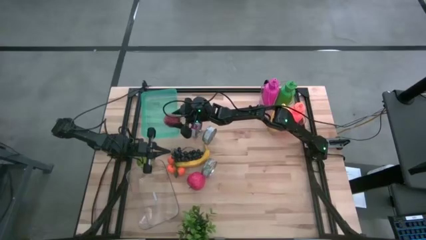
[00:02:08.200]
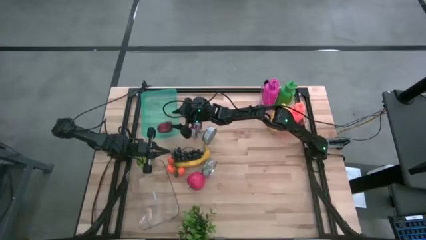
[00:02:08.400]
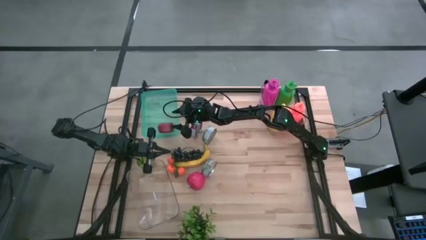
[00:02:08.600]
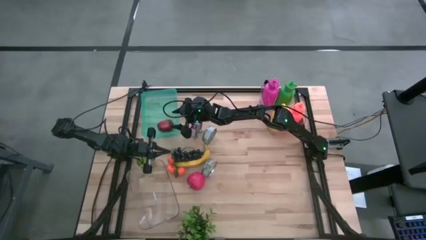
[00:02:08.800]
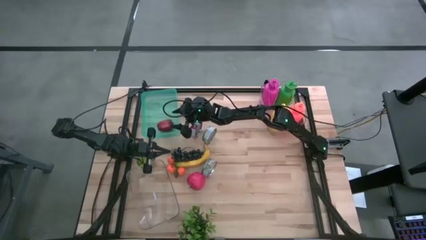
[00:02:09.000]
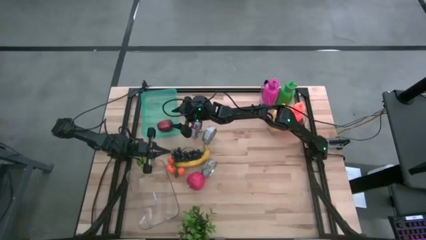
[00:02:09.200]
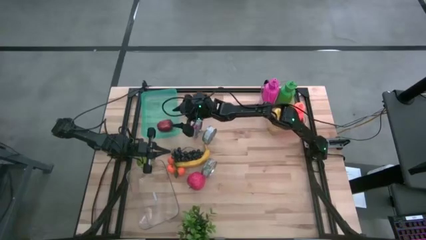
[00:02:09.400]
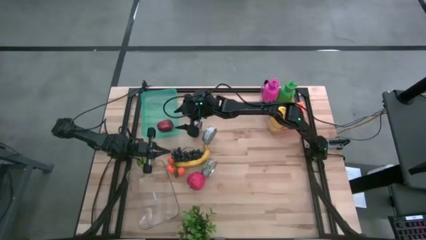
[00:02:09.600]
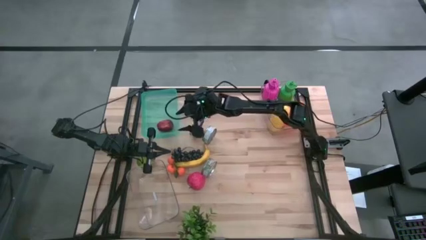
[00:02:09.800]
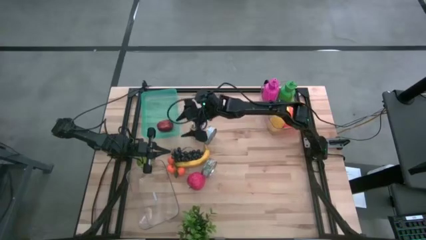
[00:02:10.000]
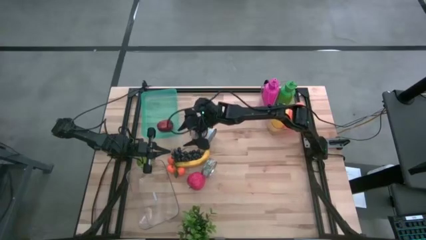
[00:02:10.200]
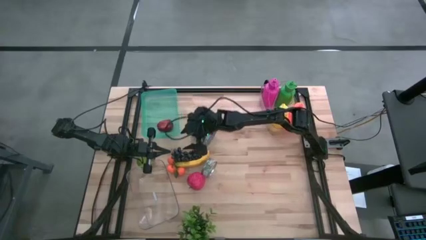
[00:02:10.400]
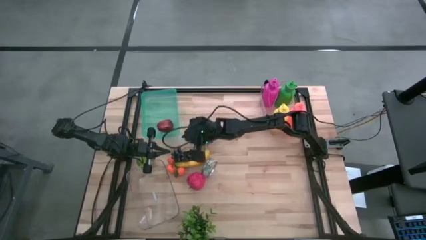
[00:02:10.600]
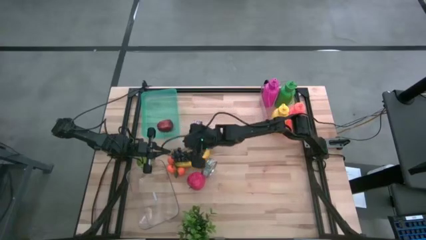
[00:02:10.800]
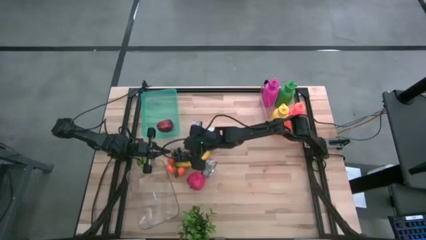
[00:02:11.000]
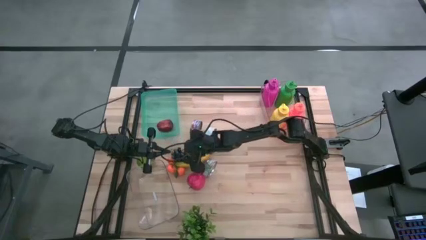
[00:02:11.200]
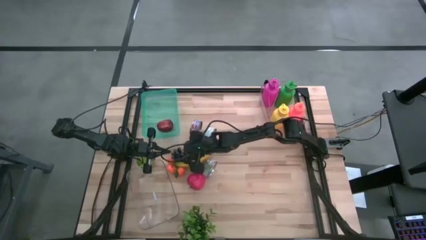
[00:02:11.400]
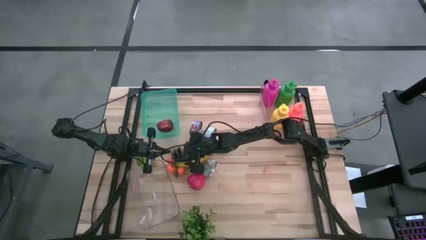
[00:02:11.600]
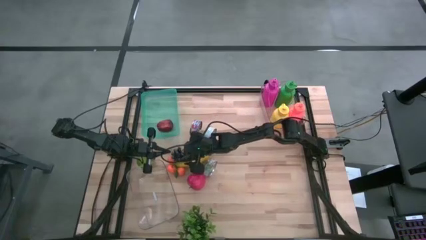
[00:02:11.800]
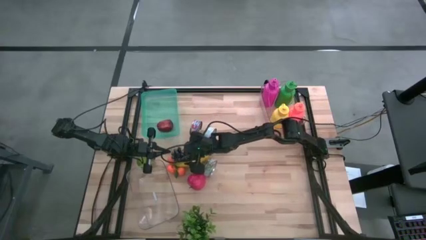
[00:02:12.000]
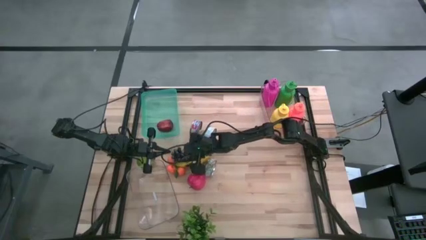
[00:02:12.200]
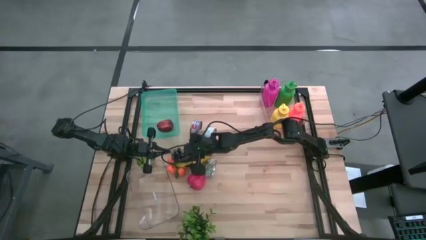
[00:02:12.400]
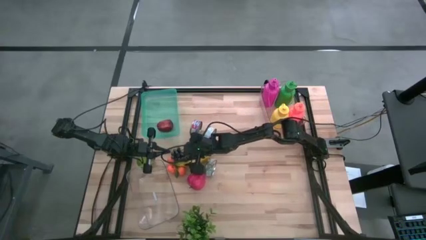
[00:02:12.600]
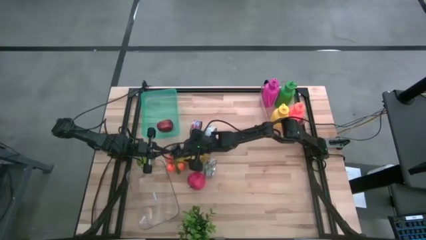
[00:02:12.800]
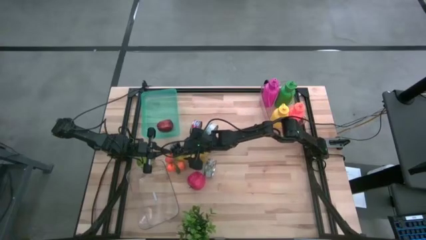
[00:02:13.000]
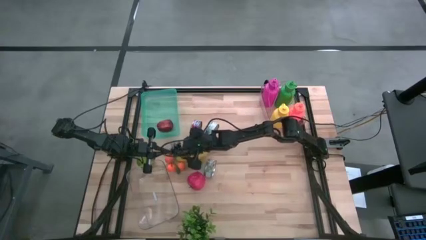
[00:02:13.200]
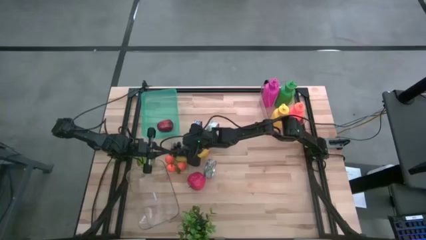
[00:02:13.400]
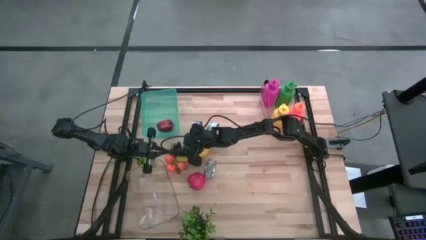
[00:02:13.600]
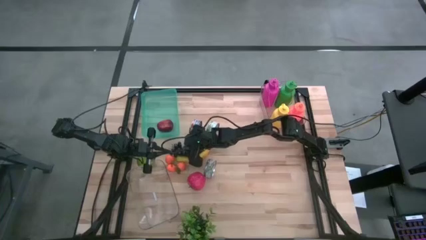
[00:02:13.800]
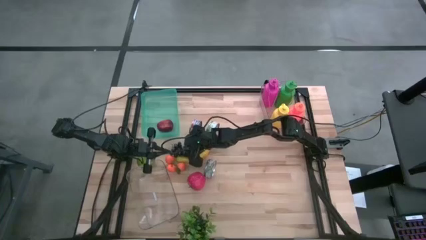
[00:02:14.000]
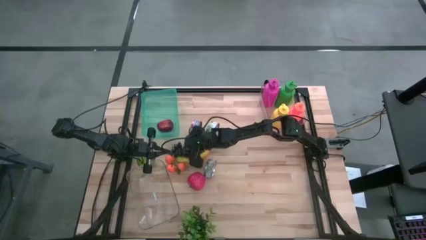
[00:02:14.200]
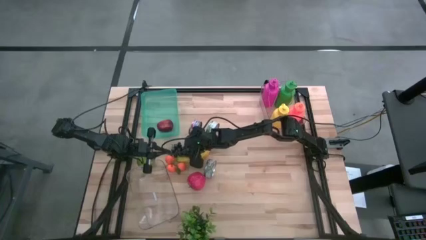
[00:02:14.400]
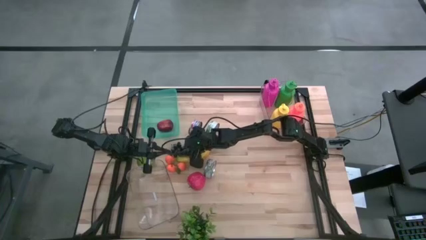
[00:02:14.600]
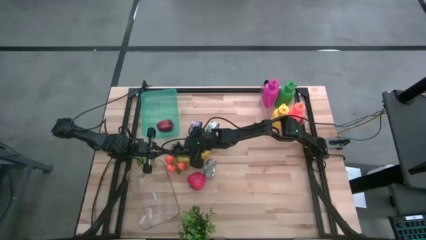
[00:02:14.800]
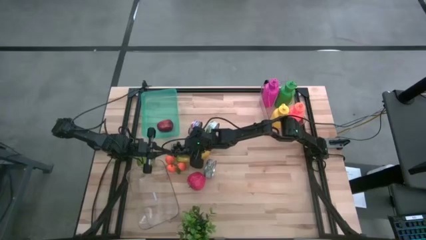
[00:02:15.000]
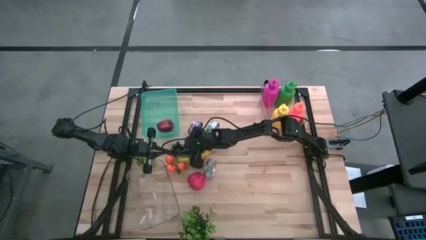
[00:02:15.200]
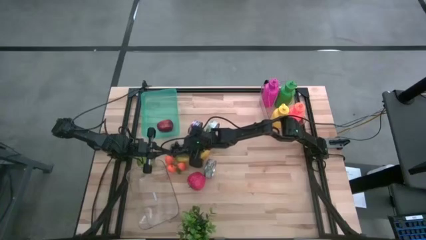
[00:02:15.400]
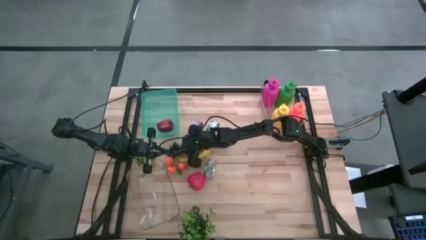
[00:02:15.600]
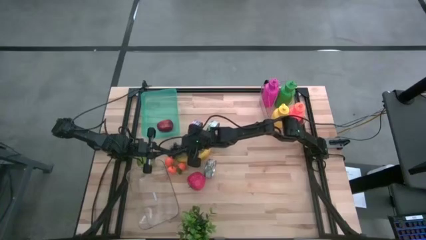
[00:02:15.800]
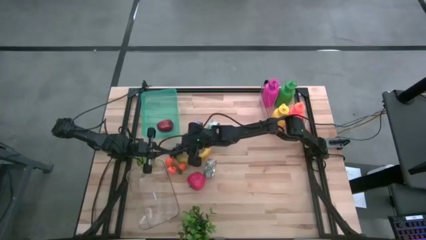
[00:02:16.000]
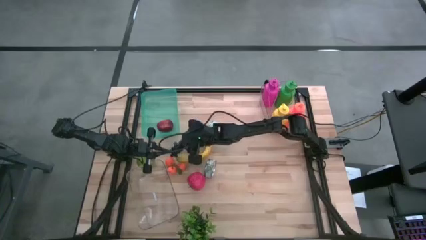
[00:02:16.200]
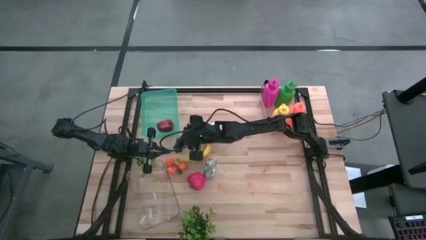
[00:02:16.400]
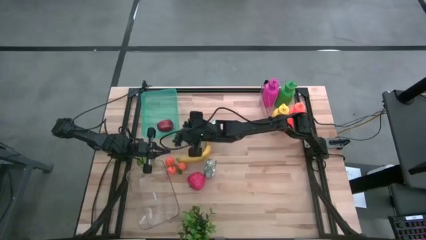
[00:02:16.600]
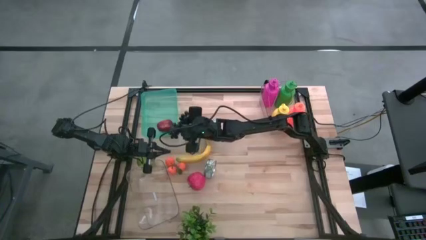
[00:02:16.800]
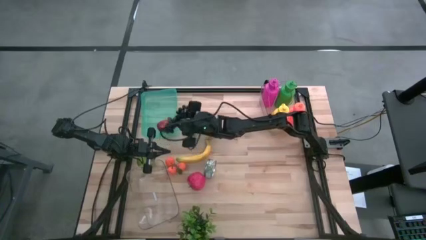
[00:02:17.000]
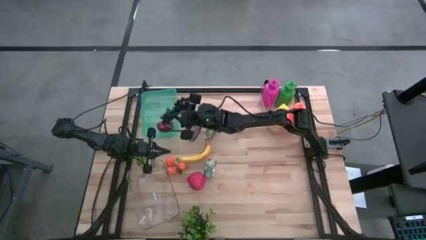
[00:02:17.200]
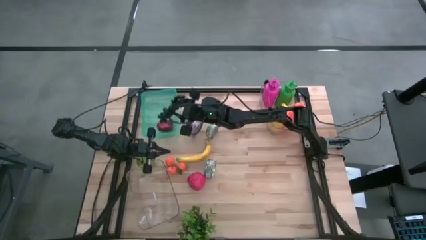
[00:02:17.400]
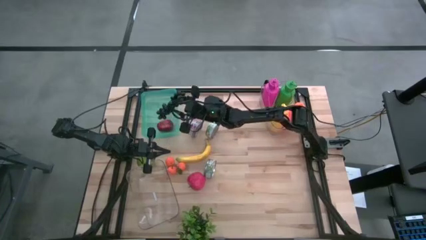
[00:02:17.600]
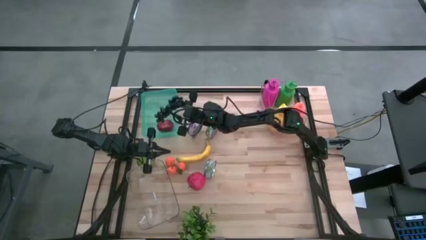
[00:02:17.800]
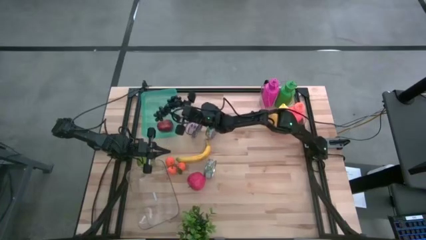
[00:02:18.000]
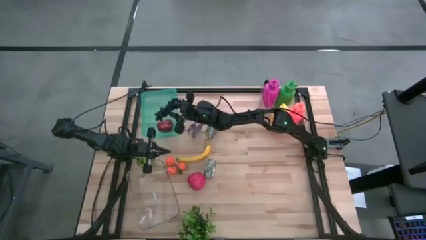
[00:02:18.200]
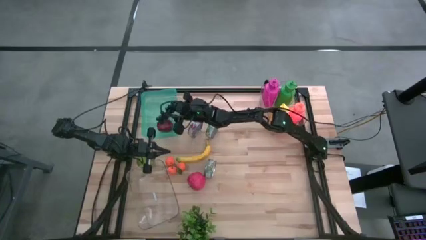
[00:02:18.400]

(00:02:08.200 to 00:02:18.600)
Task: Pick & Place Food Item
Put the grapes into the green bin
